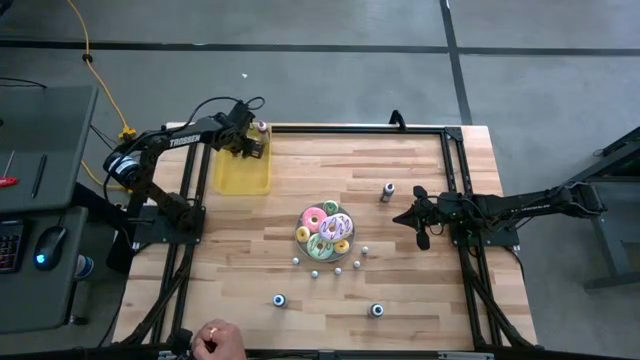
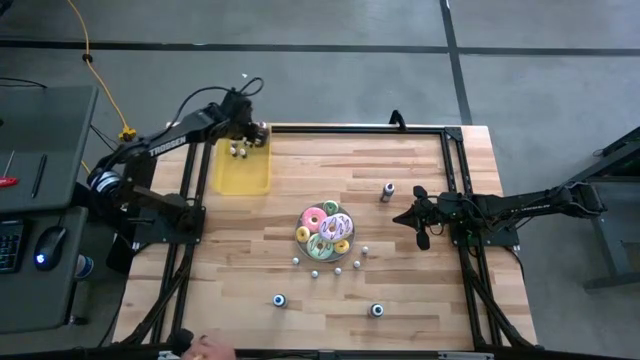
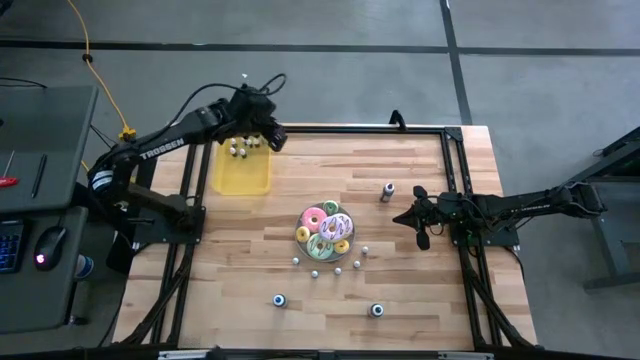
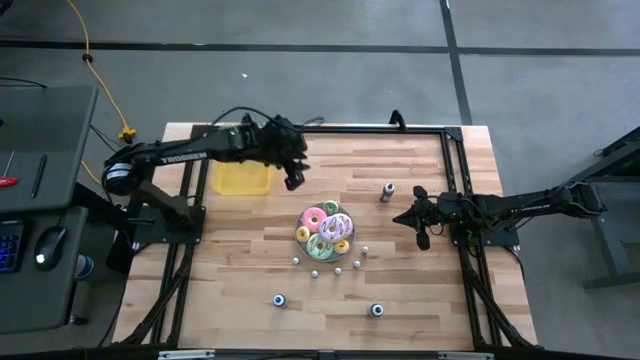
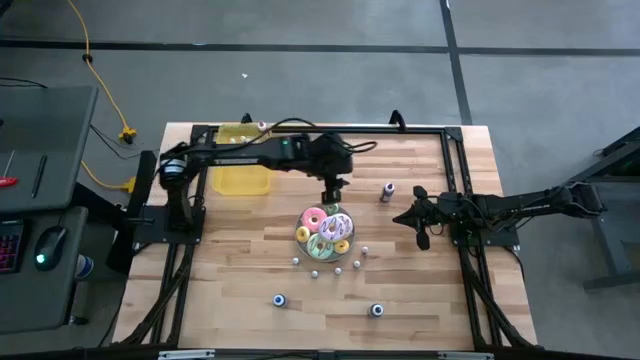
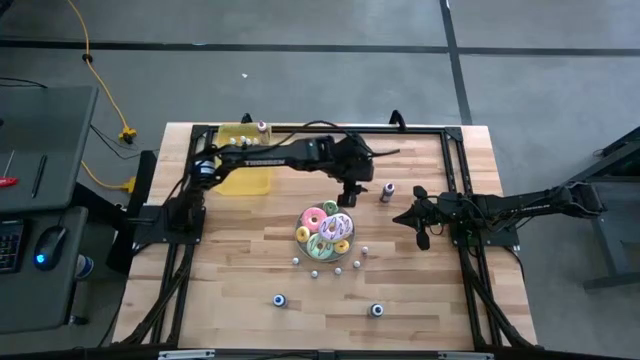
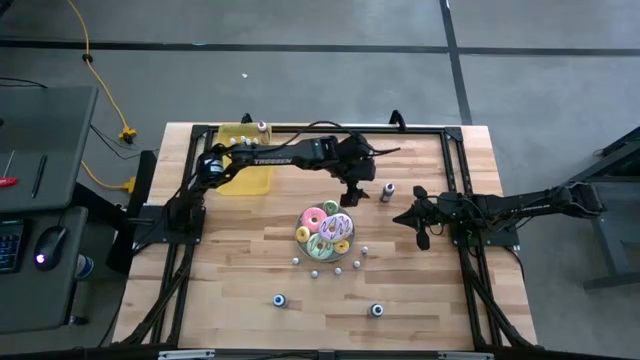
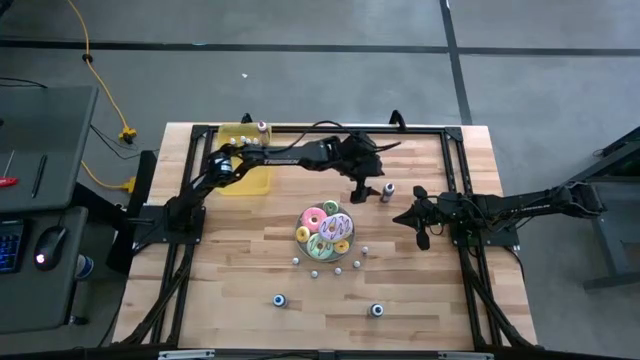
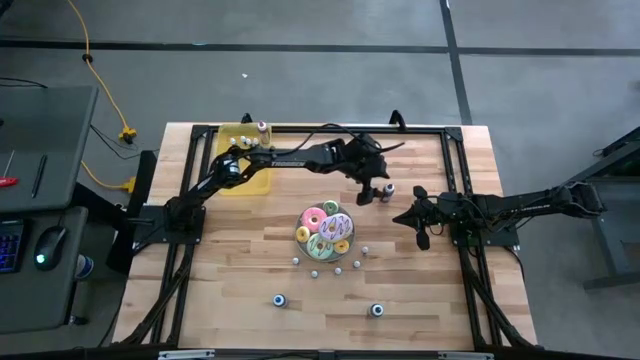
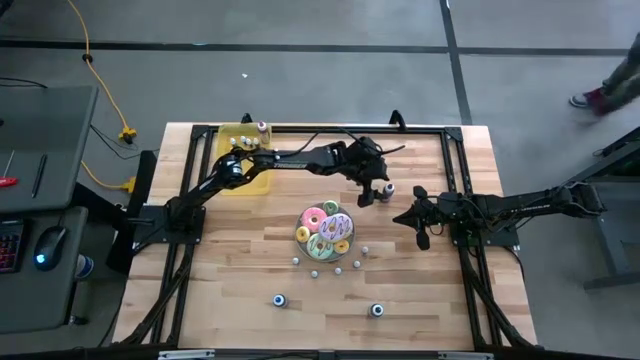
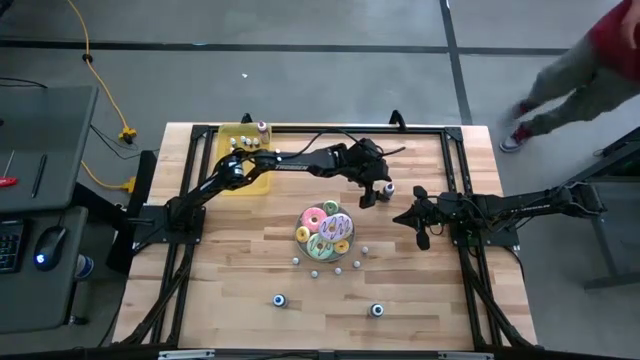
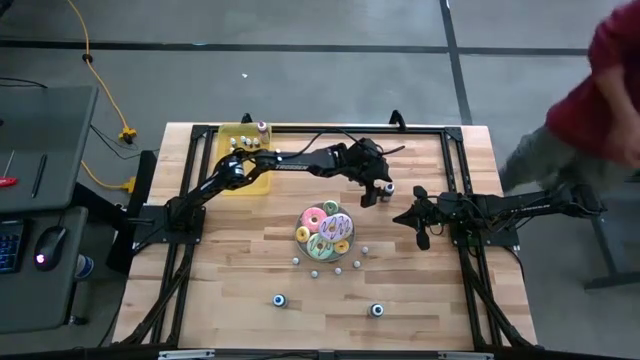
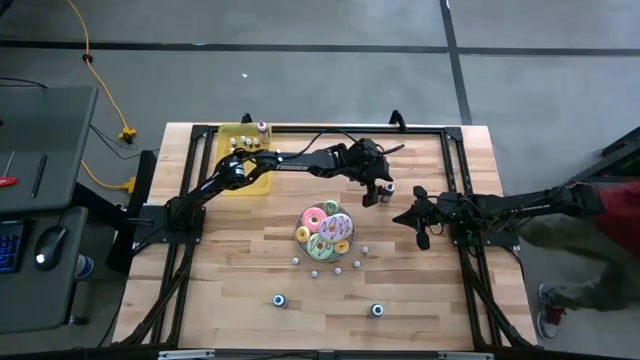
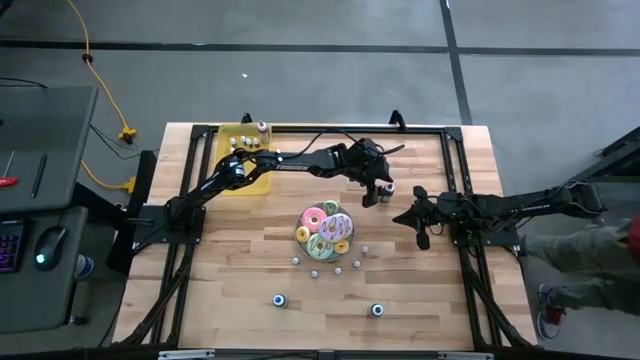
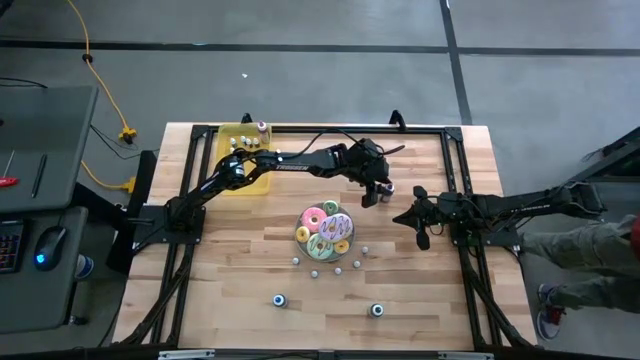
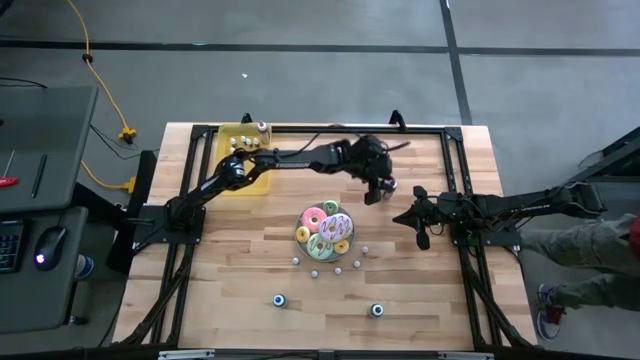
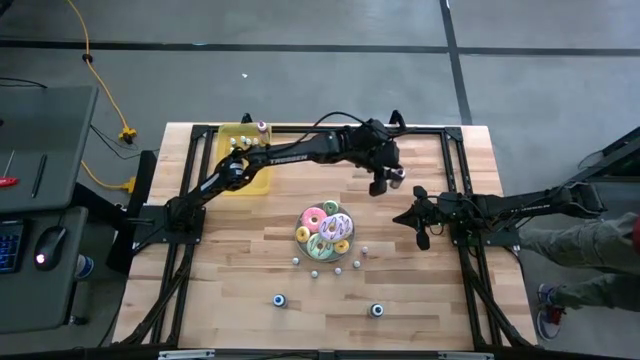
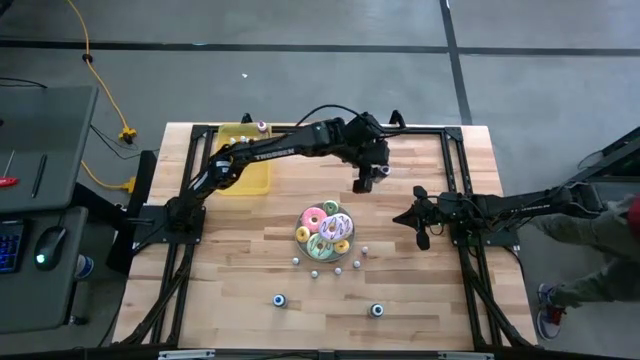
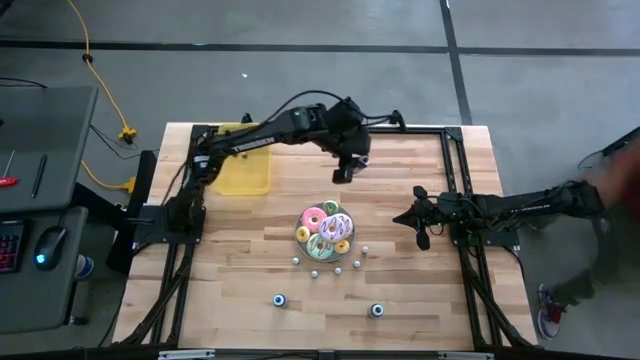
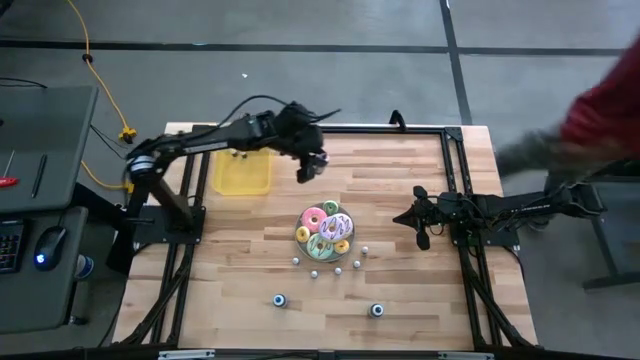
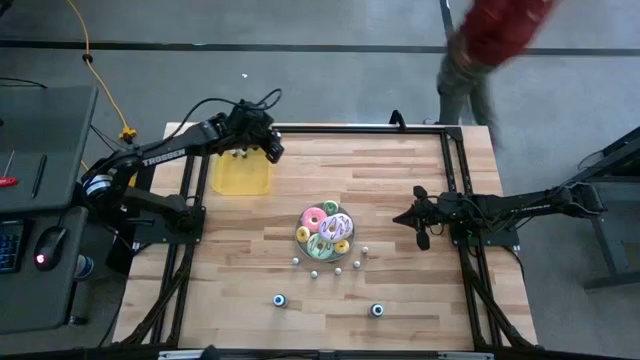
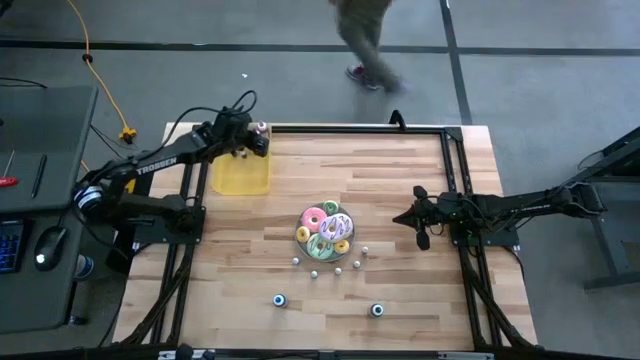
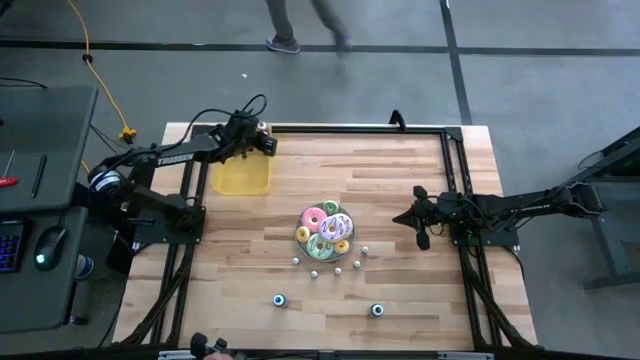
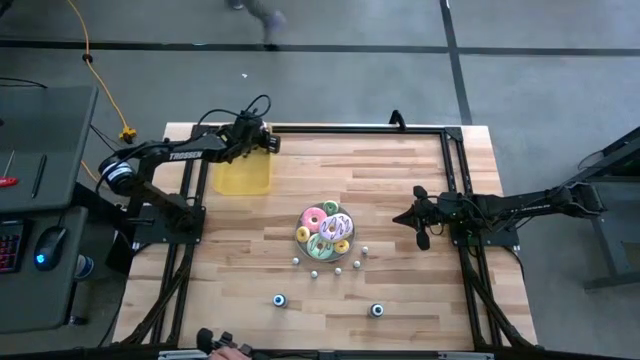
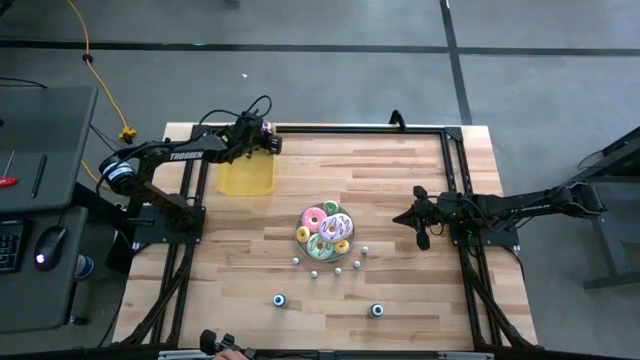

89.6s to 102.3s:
Task: Pick & Place food coloring
Put the large violet food coloring bottle into the yellow bin

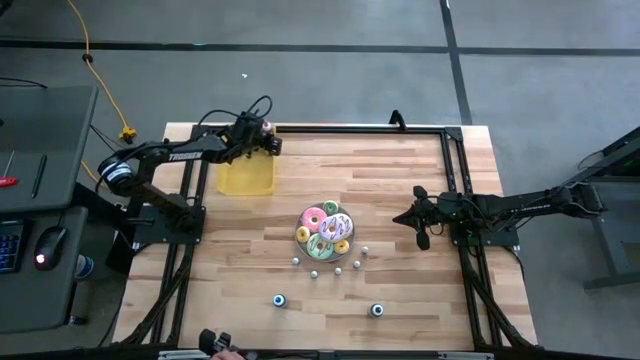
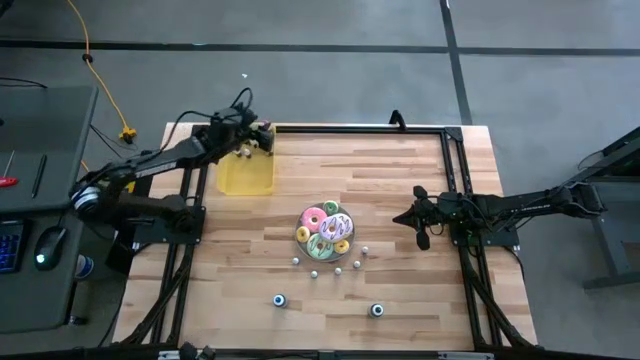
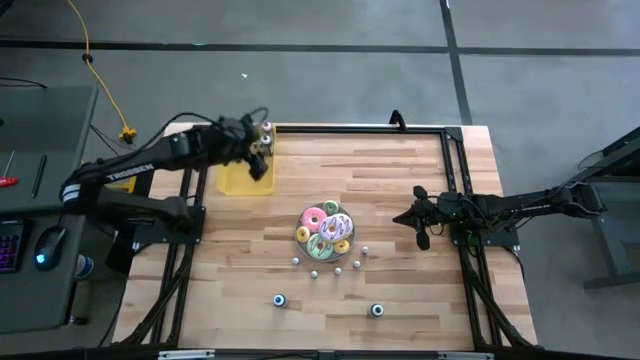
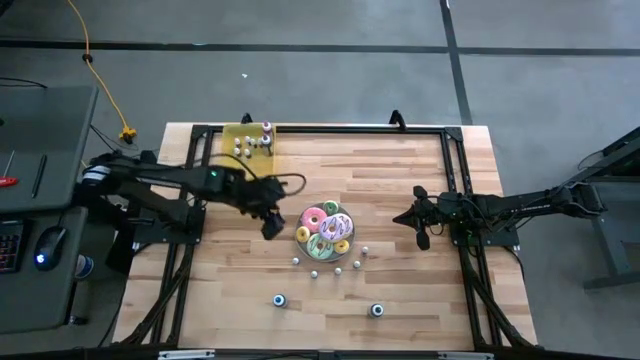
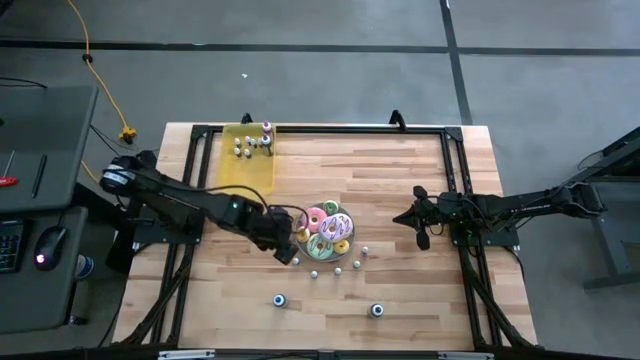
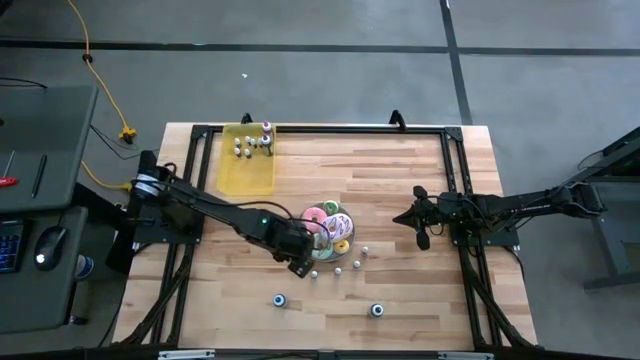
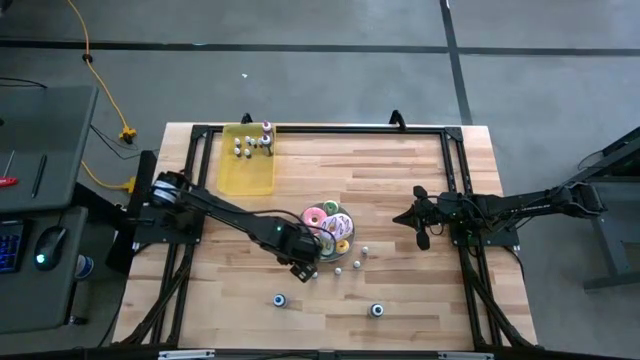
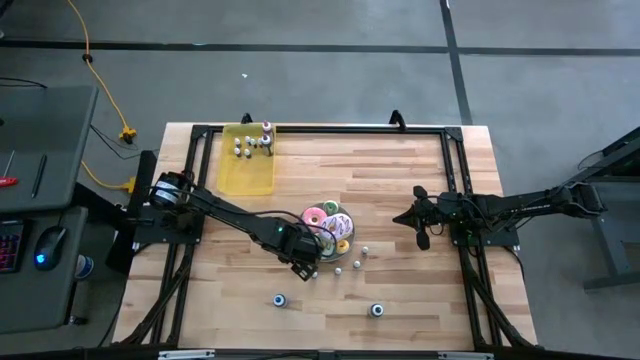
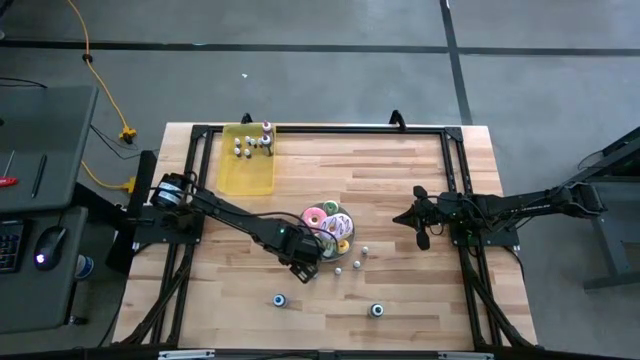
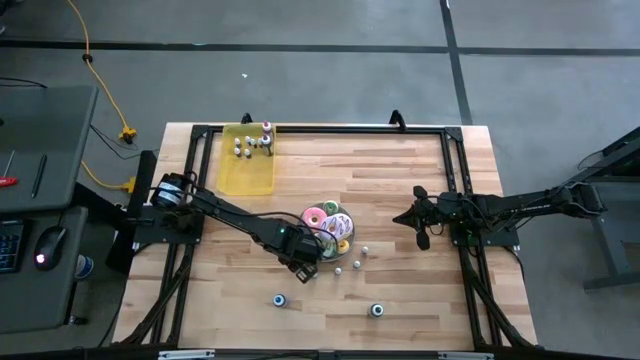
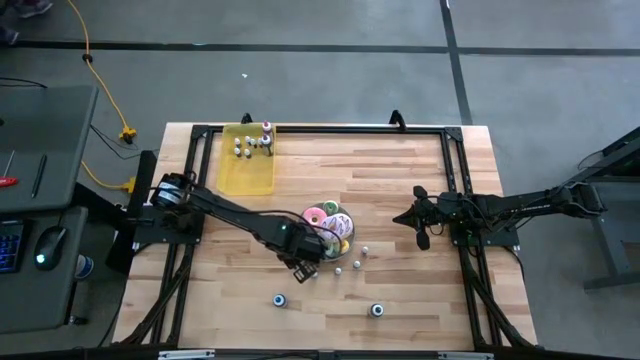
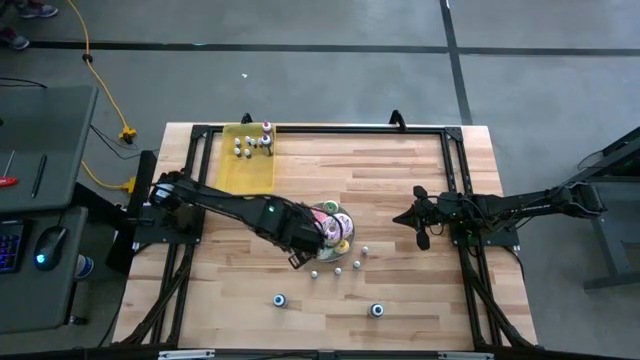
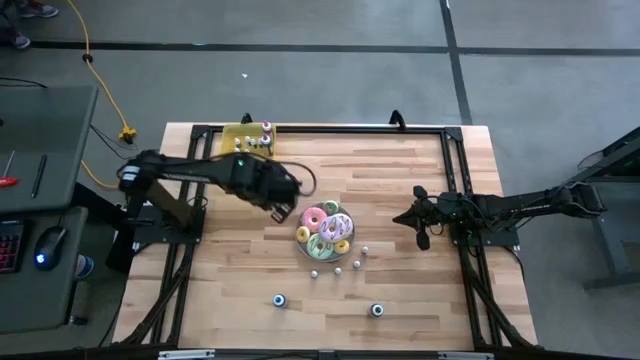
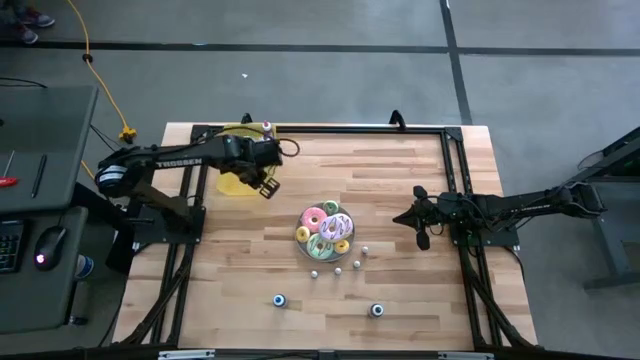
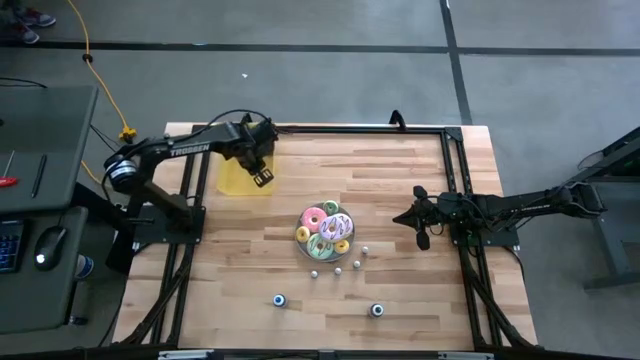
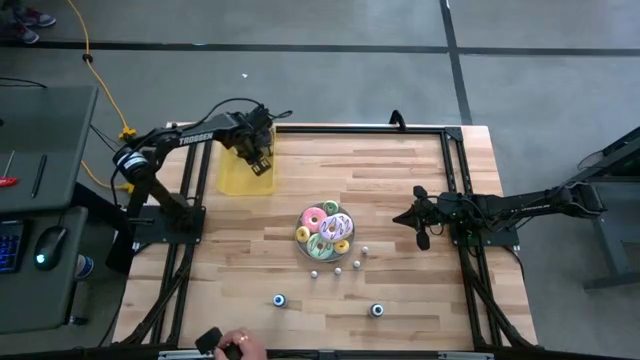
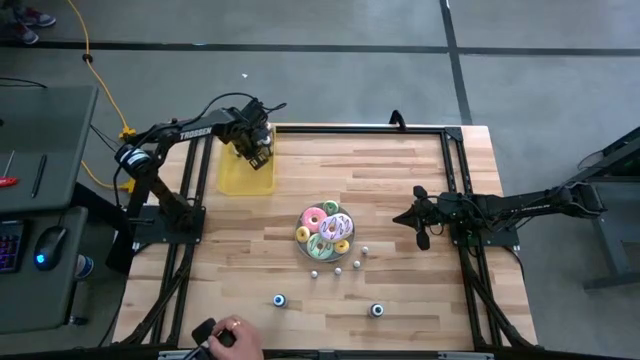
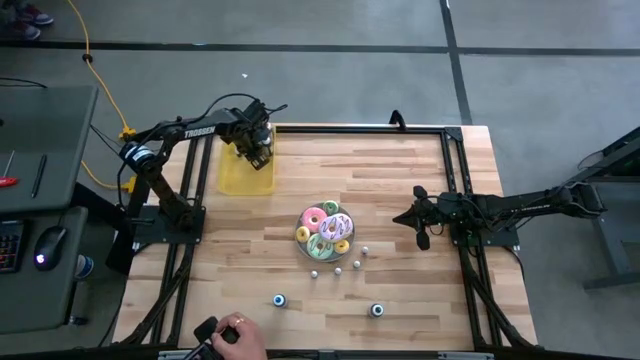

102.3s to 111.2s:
Put the small food coloring bottle into the yellow bin
